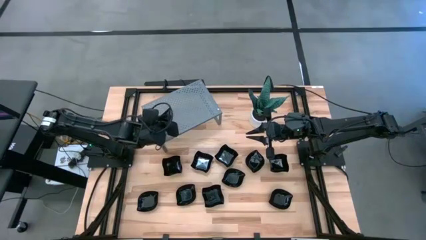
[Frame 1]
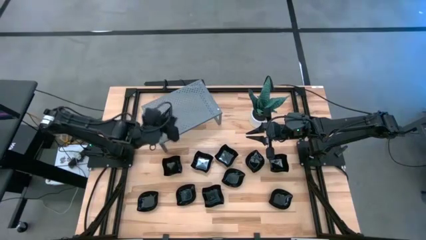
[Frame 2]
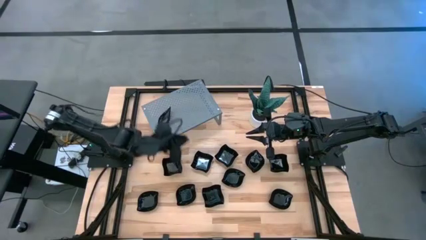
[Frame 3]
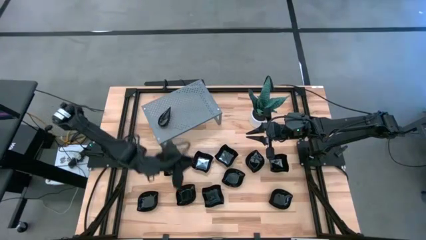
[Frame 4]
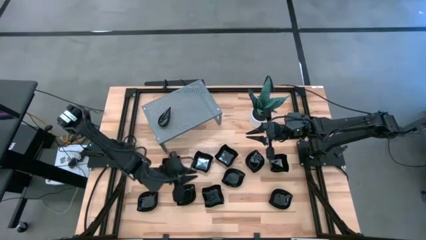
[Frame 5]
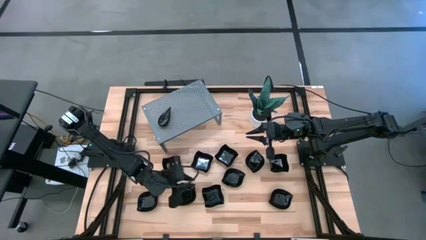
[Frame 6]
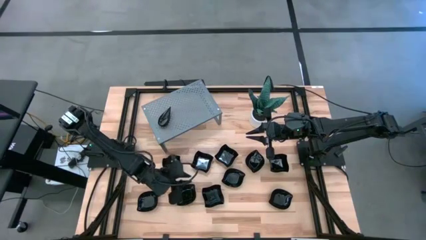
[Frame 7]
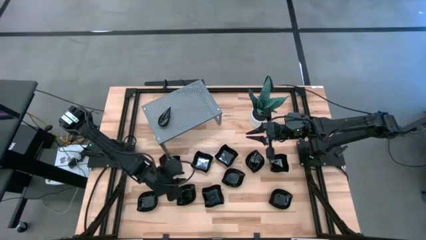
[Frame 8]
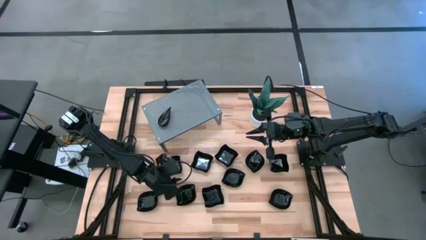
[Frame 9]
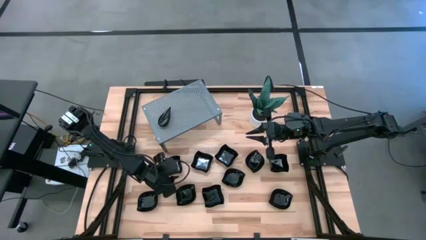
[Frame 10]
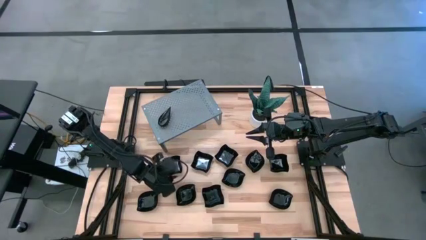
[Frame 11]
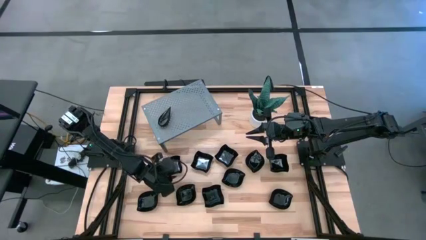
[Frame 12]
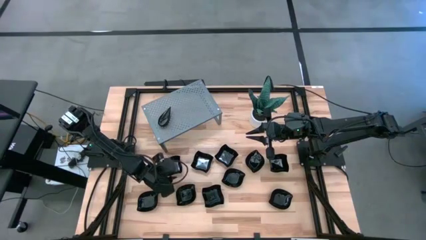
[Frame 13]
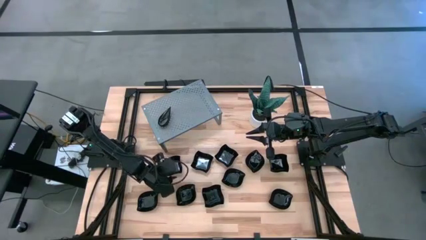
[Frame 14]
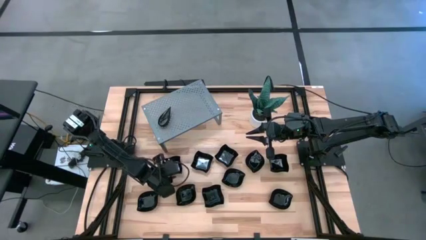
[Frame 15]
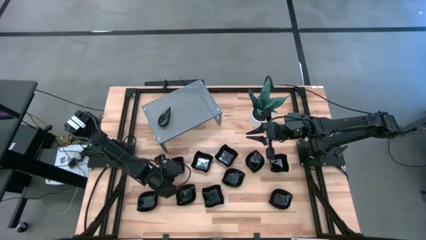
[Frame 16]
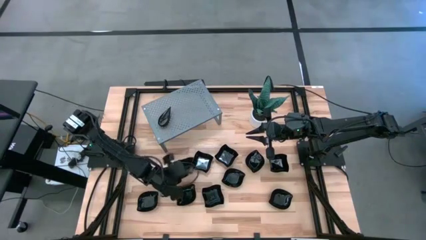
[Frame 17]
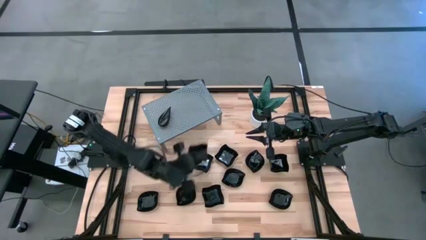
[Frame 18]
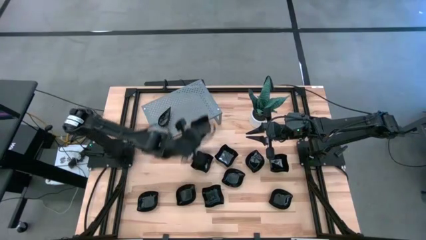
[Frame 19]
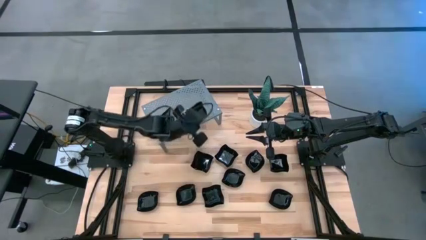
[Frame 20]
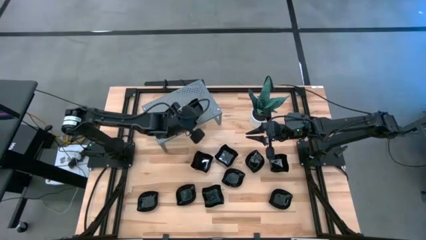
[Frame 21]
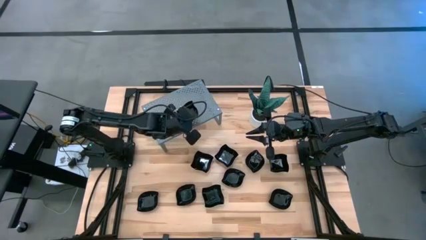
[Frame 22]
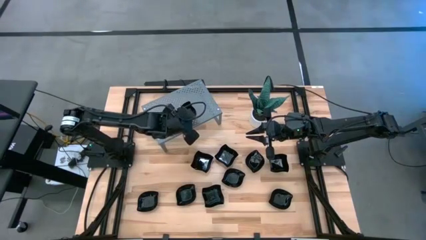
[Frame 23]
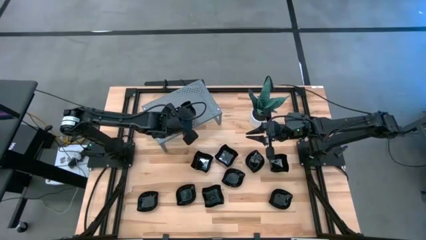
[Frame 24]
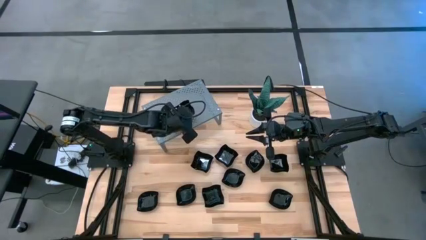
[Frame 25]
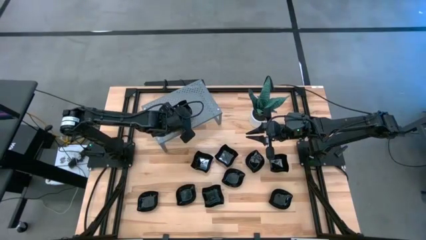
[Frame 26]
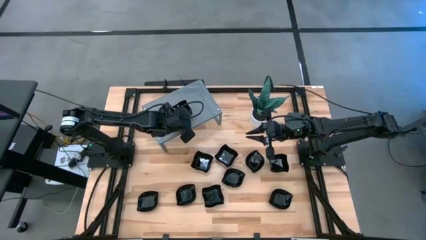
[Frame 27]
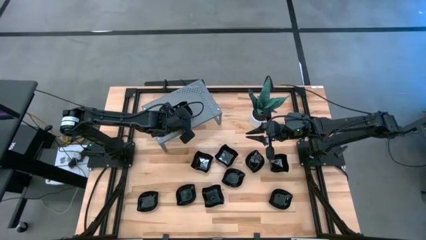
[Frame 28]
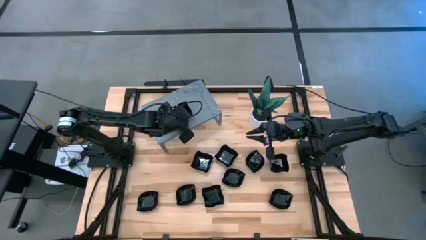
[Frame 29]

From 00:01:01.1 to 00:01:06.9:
Task: Pick & Place Mini shaped plates
Put the black distorted square plate on the shelf

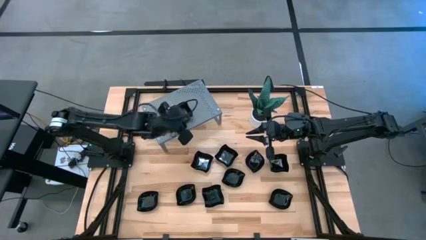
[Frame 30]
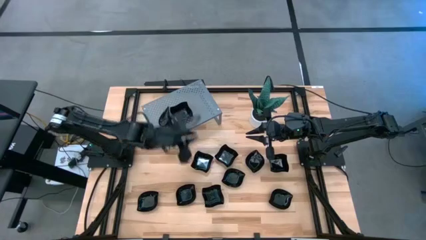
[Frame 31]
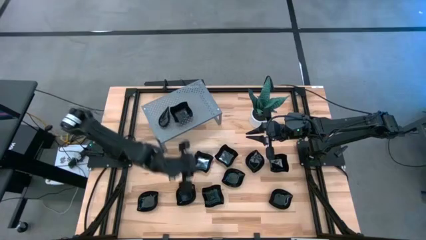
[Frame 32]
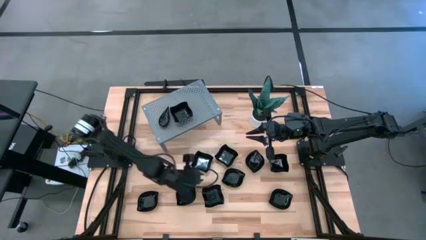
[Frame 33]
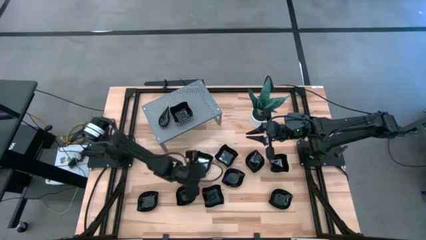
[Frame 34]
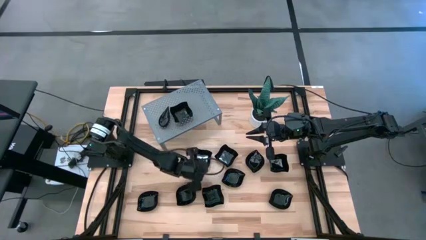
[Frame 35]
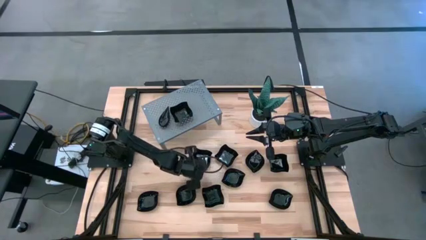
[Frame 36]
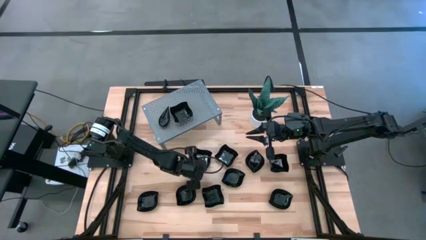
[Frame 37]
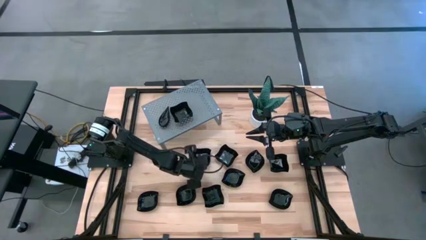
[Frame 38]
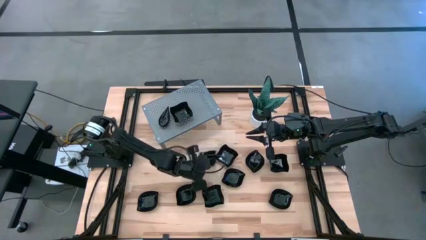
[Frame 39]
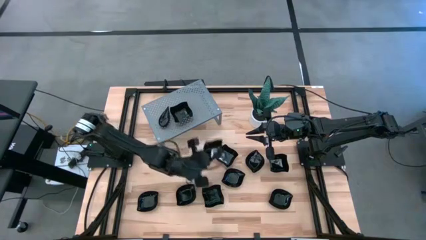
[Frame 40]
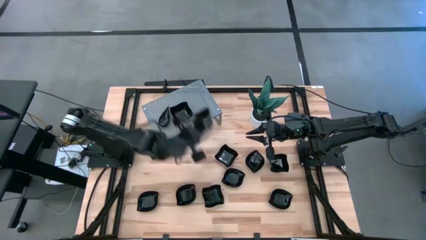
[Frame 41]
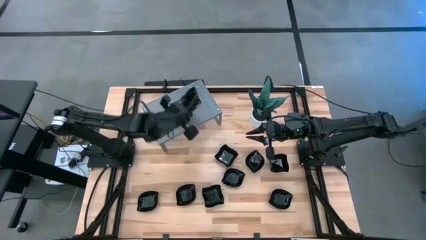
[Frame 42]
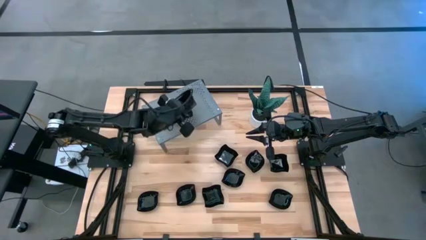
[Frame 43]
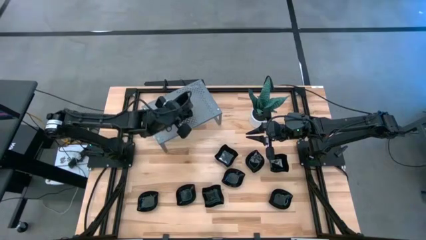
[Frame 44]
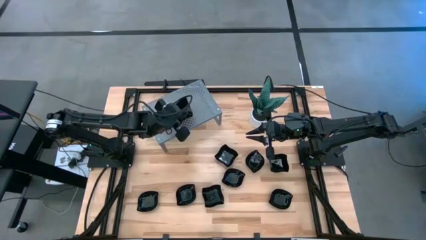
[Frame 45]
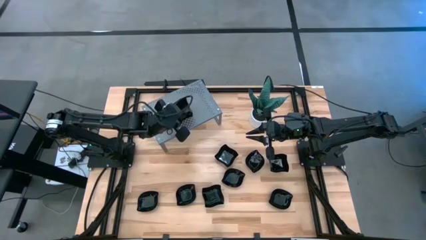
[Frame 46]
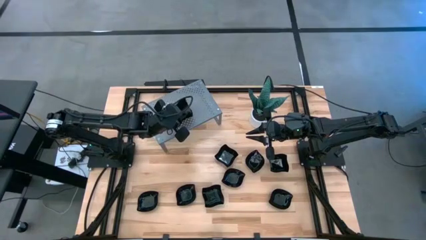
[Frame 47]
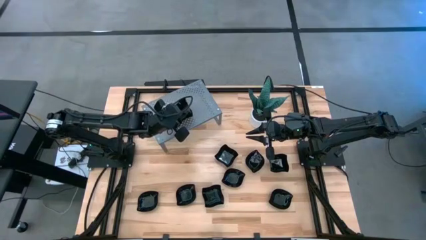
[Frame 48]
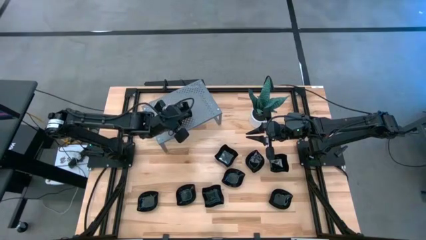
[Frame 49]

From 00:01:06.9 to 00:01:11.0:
Stack the black distorted square plate on the black distorted square plate on the shelf

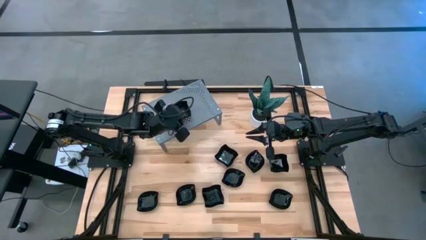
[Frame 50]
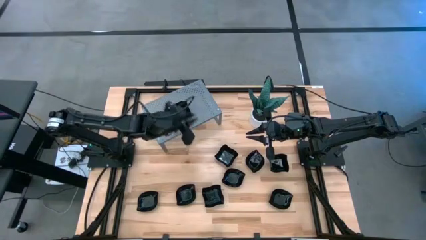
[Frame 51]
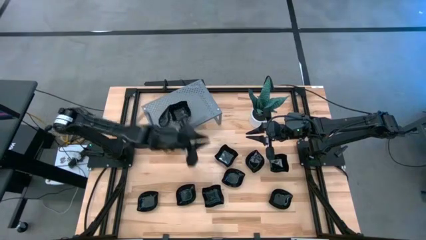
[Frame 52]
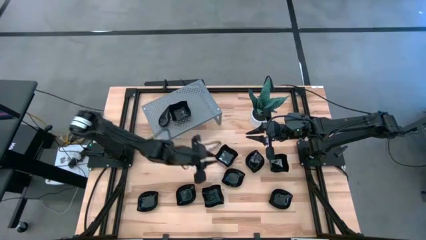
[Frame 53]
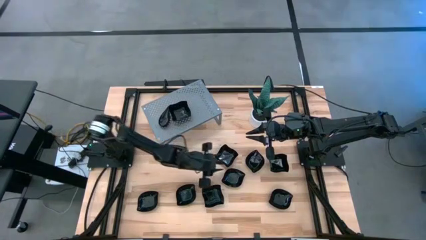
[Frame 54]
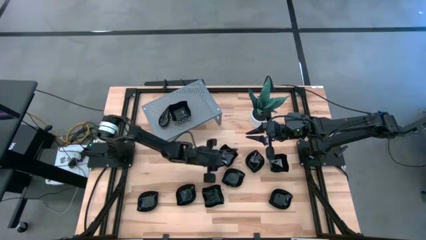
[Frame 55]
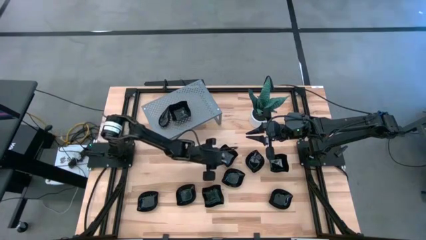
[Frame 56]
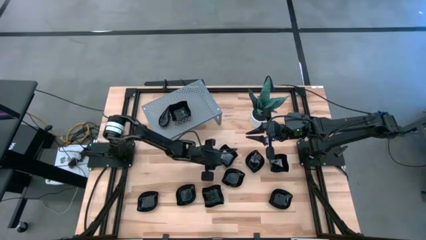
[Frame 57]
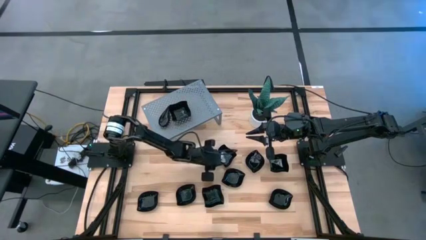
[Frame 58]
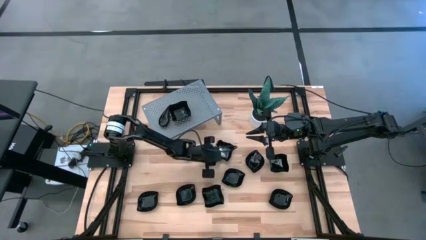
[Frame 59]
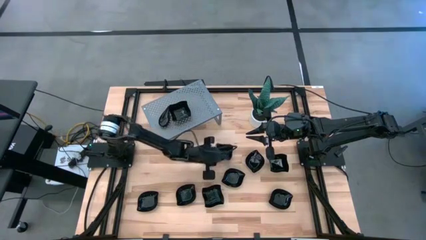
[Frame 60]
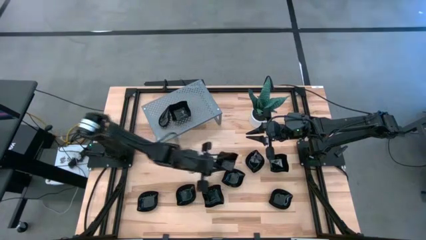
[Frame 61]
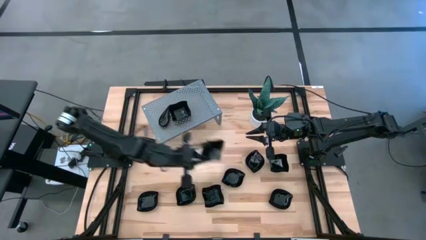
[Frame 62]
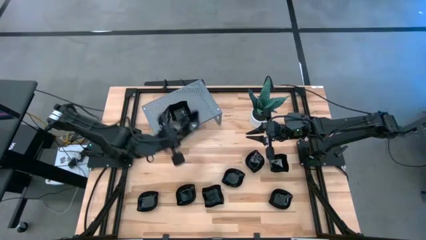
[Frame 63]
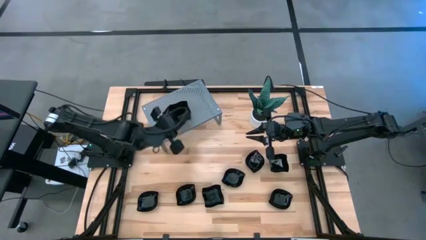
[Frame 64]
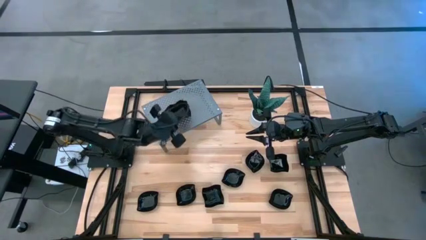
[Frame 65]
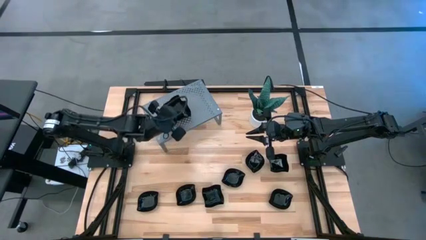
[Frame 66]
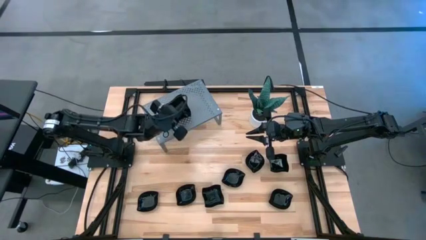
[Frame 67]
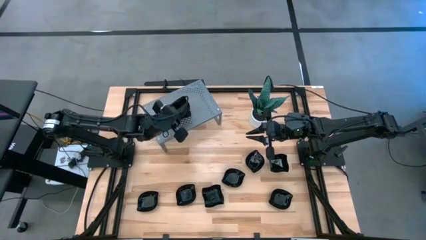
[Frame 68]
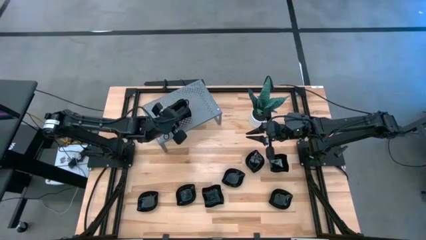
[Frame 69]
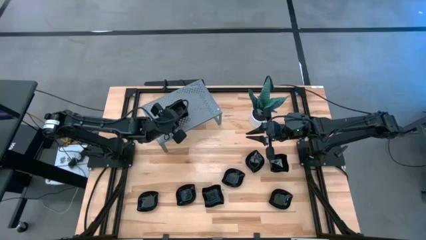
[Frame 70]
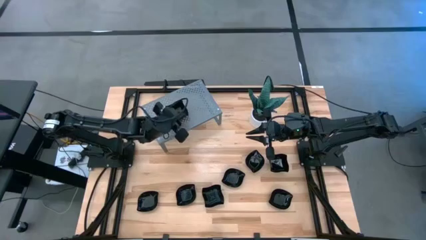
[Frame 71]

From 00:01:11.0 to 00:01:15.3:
Stack the black distorted square plate on the black distorted square plate on the shelf

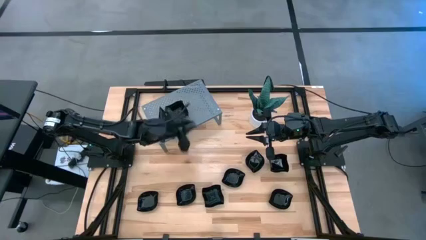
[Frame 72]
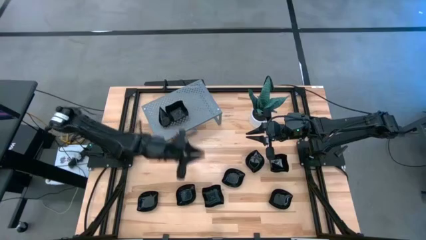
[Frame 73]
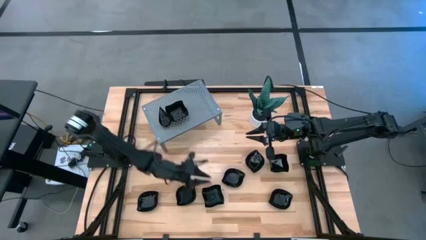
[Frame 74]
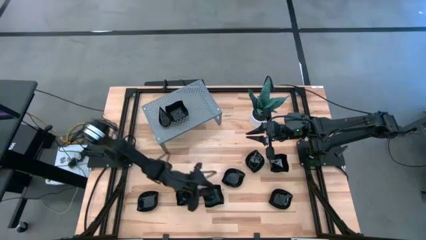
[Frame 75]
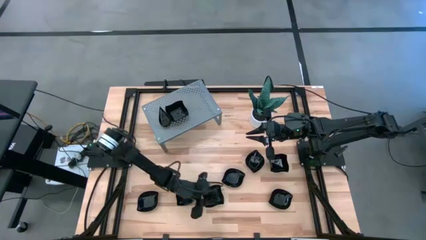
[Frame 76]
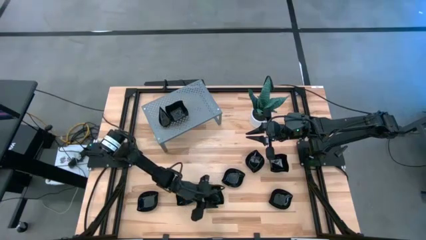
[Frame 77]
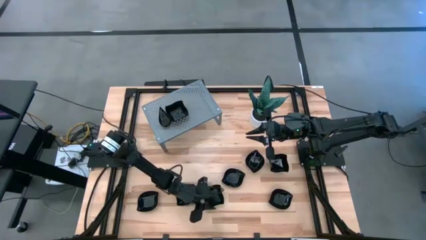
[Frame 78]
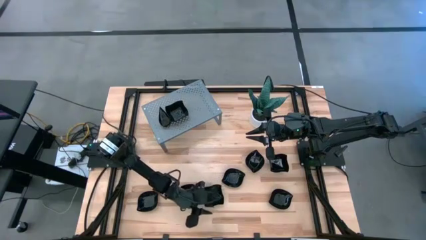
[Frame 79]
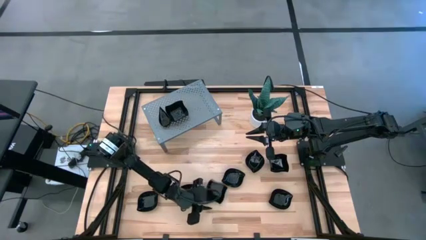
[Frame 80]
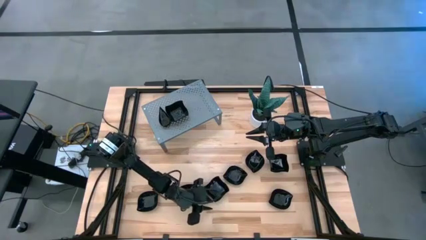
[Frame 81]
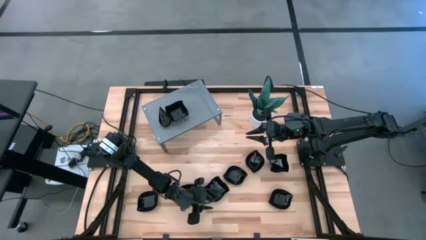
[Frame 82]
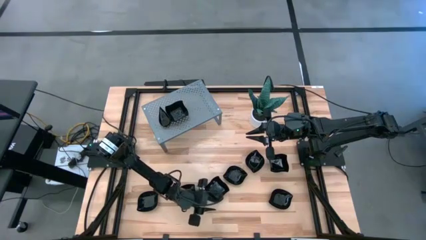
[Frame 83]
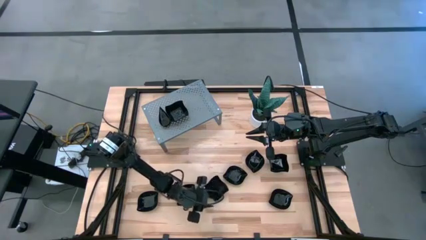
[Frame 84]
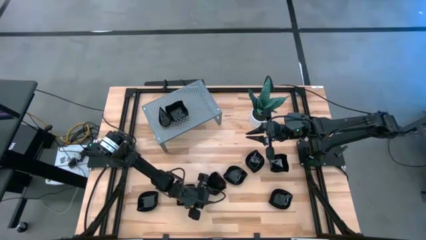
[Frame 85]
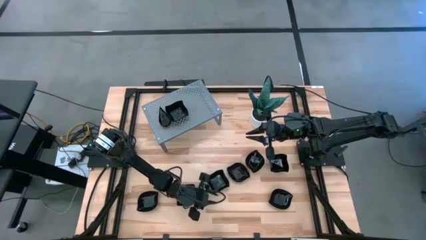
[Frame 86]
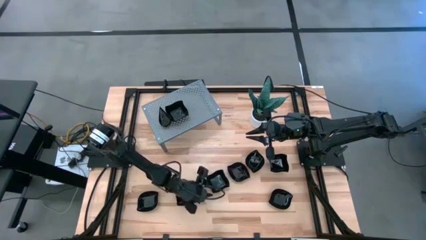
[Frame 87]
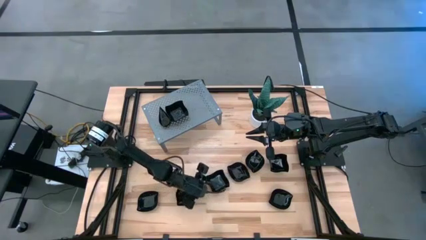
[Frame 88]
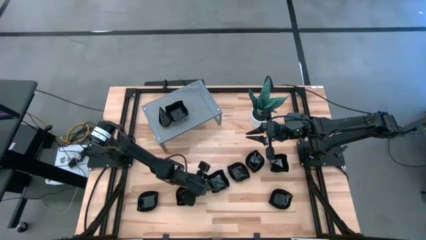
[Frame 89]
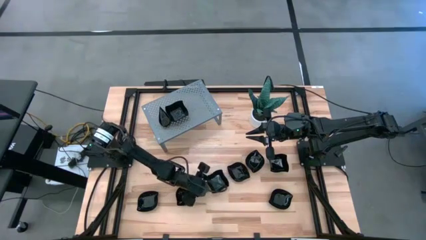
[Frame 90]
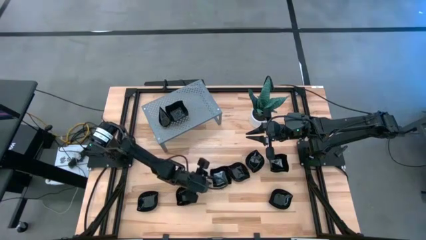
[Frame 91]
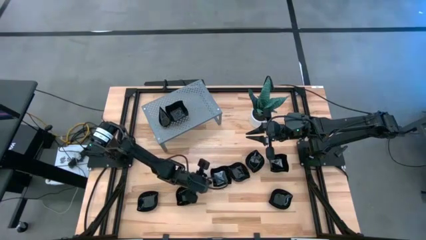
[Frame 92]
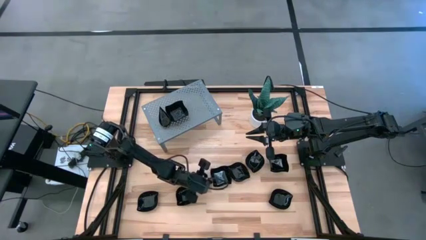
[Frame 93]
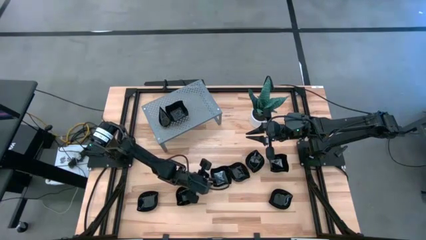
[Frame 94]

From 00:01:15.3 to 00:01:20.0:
Stack the black distorted square plate on the black distorted square plate on the shelf
